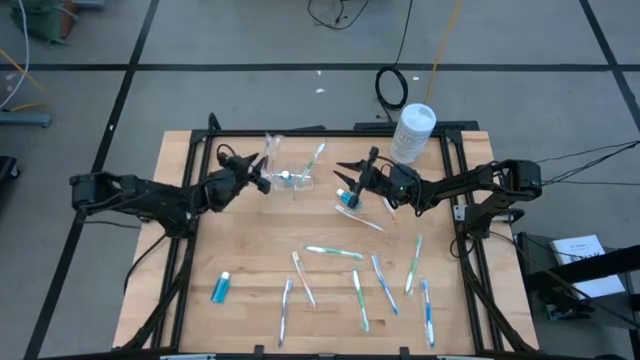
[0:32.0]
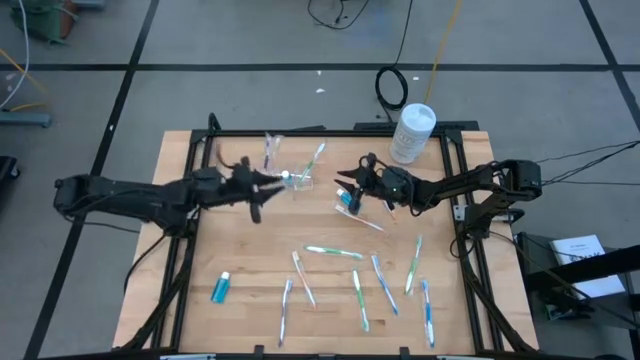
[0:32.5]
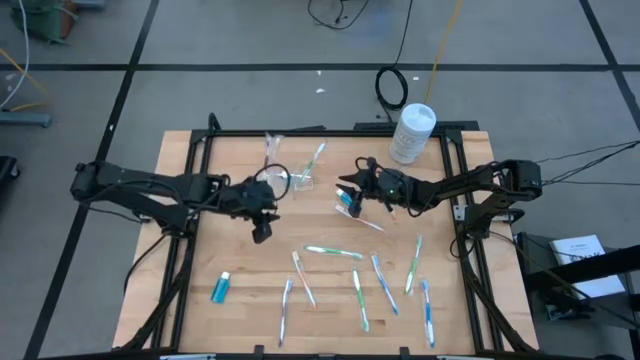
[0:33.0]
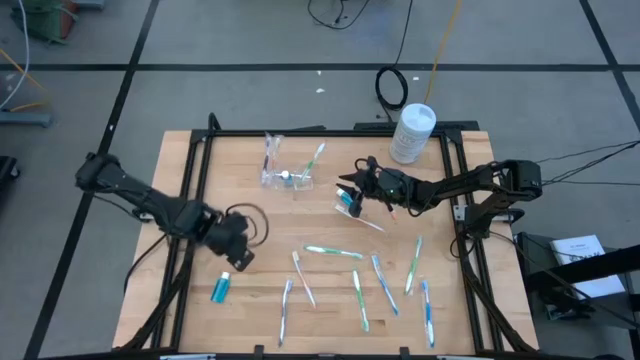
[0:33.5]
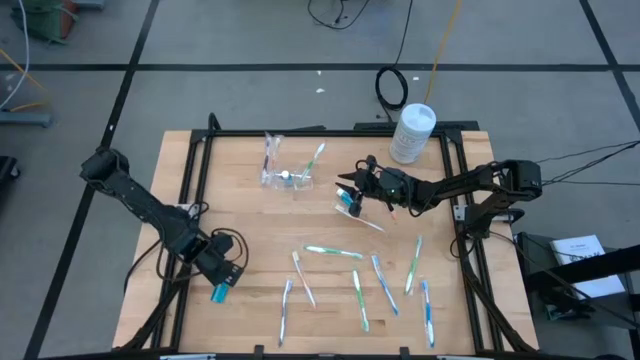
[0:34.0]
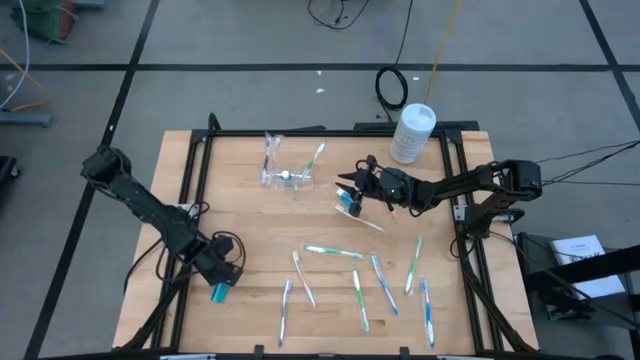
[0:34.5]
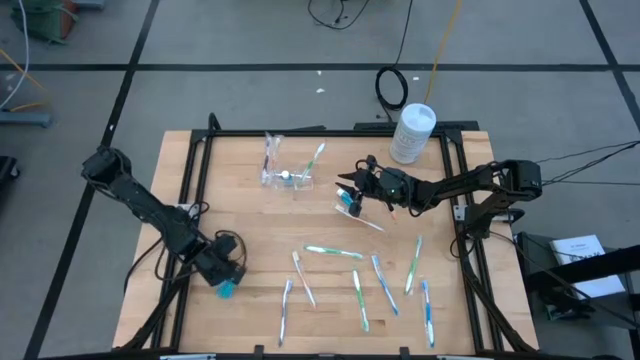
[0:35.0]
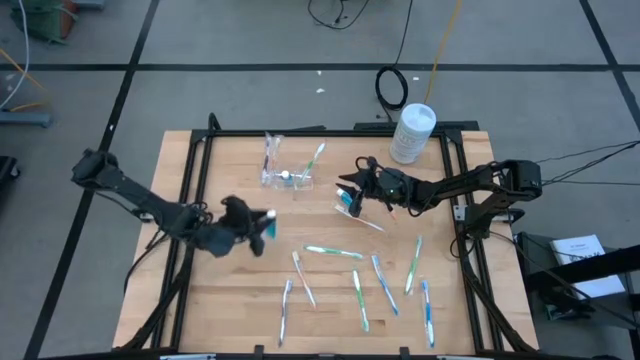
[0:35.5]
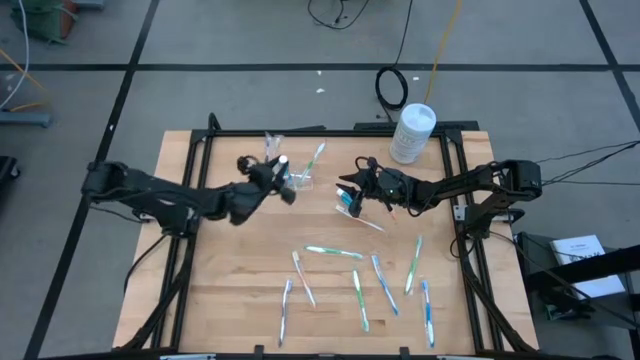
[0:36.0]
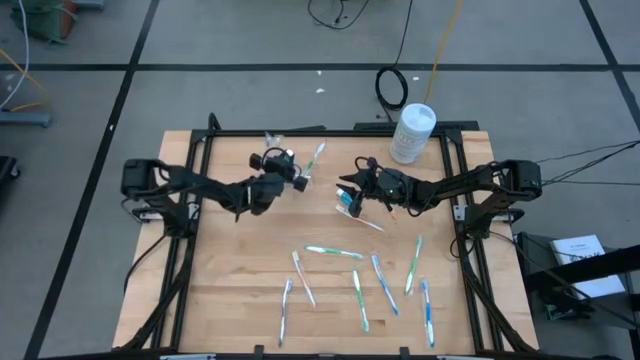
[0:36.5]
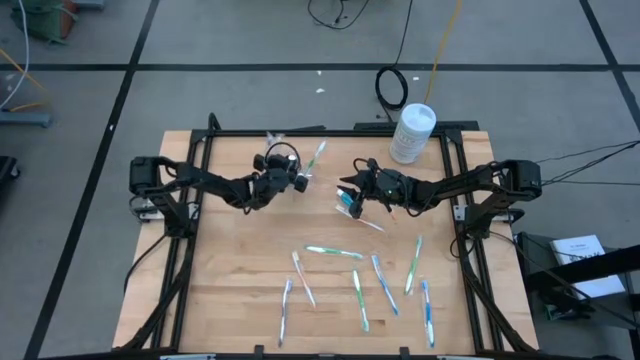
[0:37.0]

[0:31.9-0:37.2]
Task: Pick & Place toothbrushing station
Put the blue mouthwash into the transparent organizer

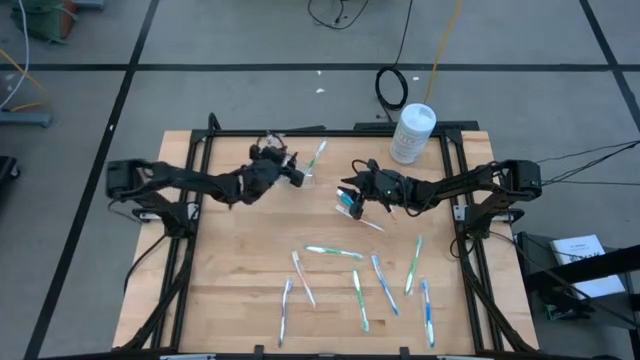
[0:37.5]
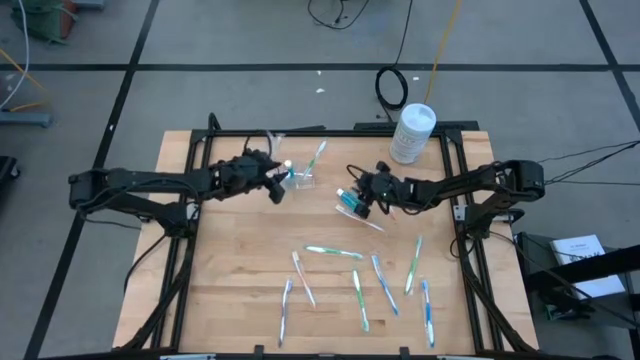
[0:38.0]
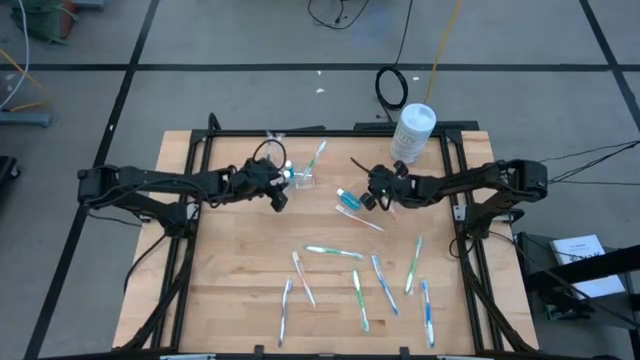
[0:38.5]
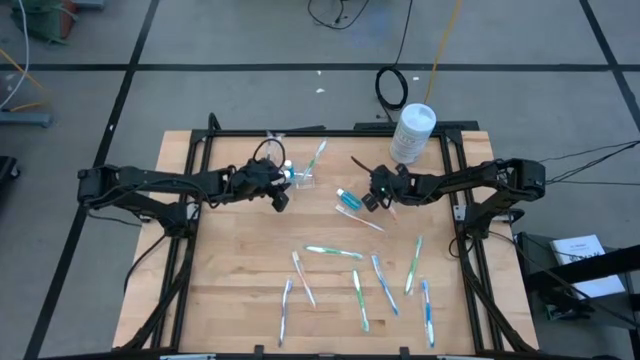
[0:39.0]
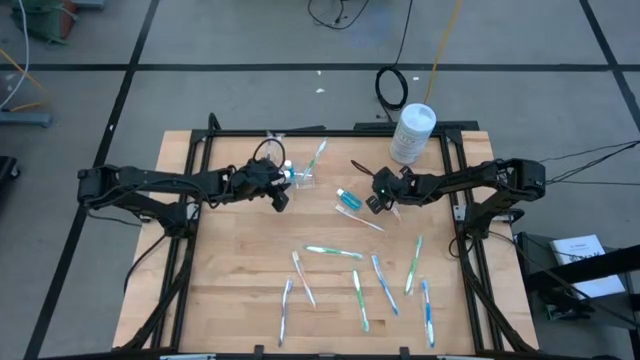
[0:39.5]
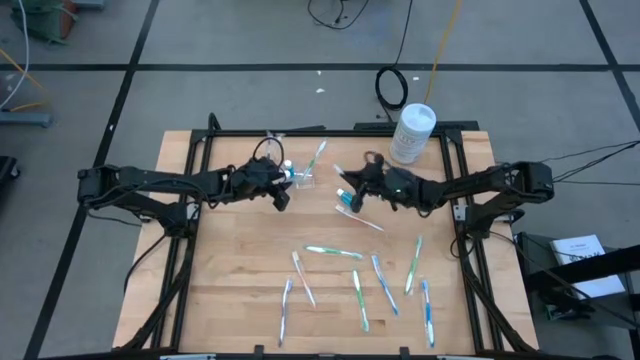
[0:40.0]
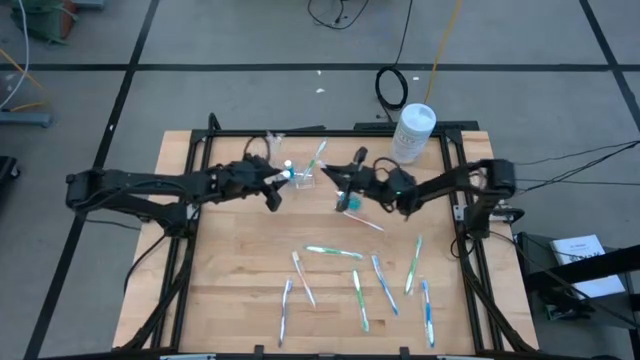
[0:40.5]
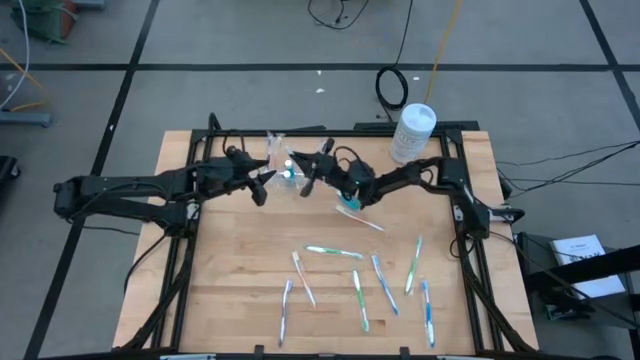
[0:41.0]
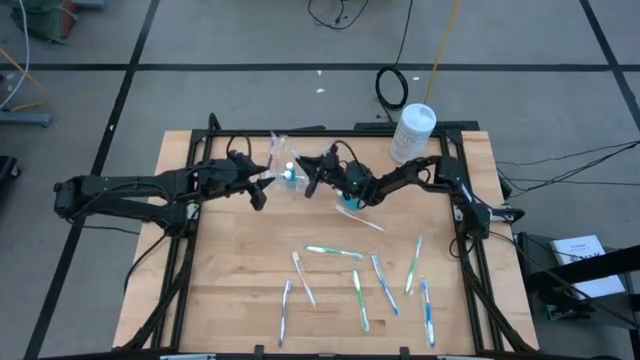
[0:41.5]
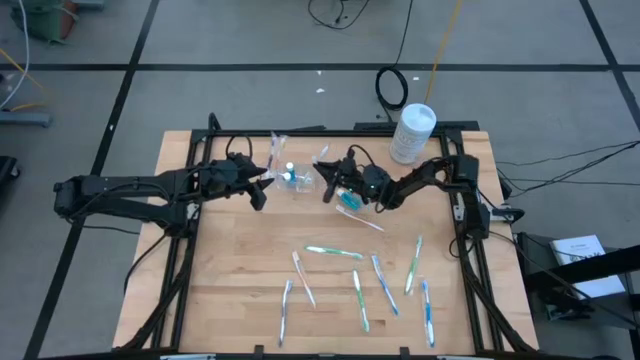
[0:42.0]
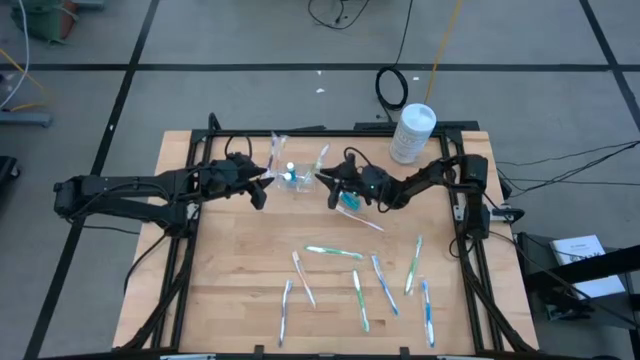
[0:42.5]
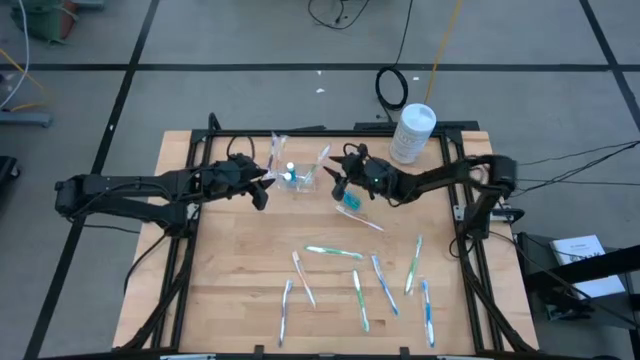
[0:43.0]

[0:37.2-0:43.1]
Put the orange toothbrush into the transparent organizer

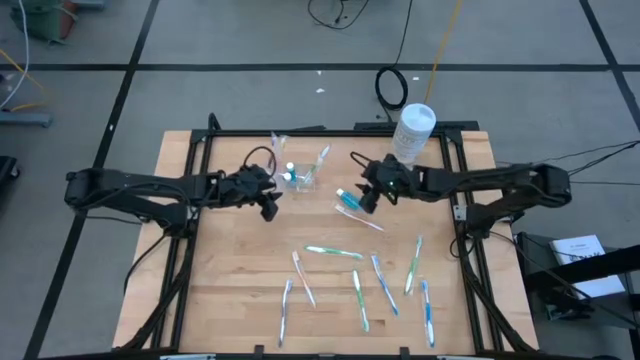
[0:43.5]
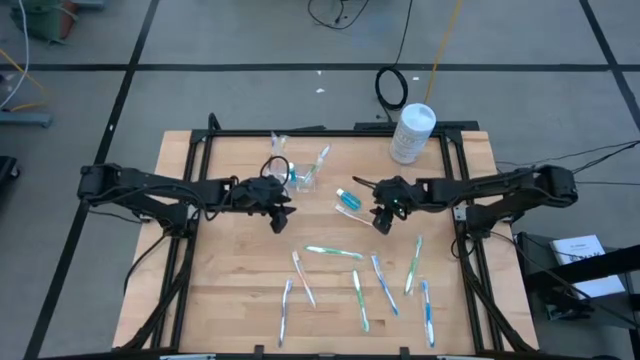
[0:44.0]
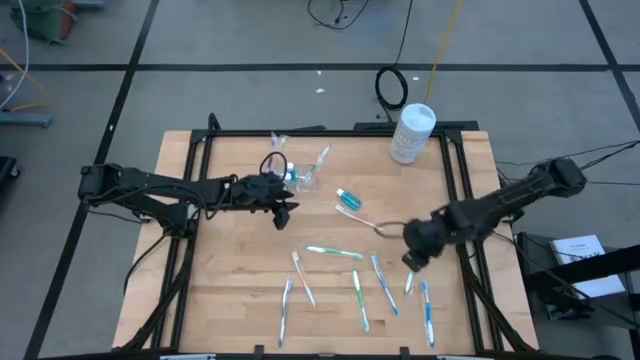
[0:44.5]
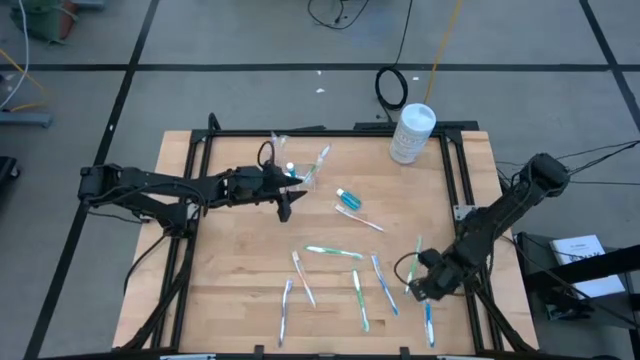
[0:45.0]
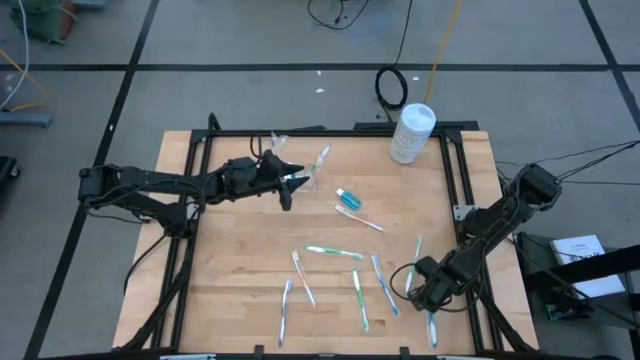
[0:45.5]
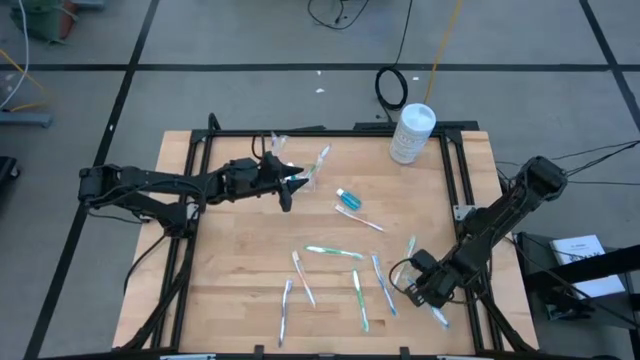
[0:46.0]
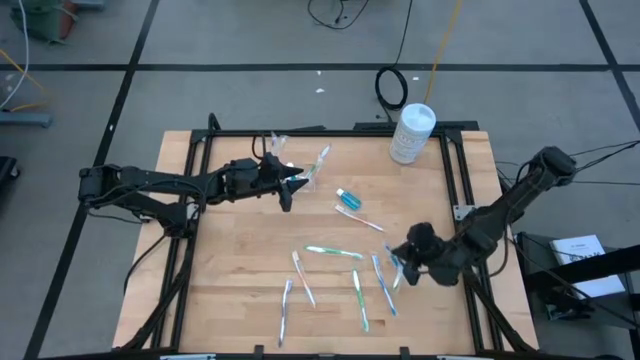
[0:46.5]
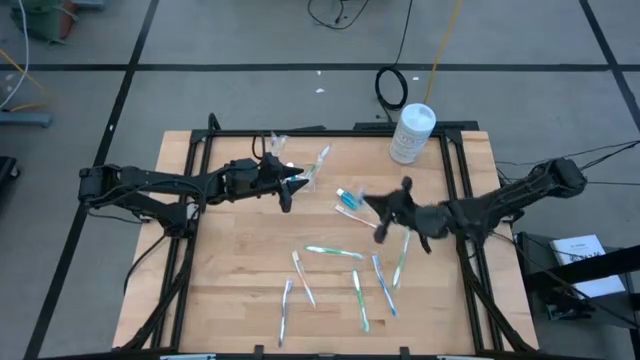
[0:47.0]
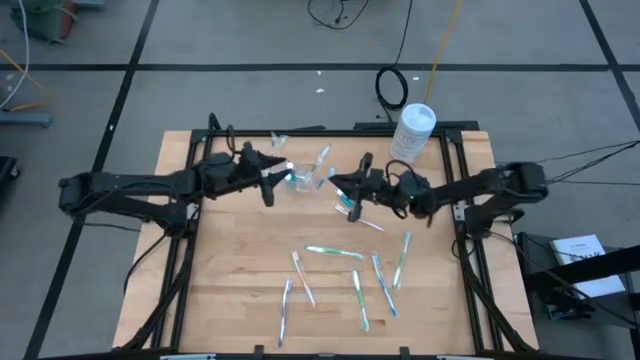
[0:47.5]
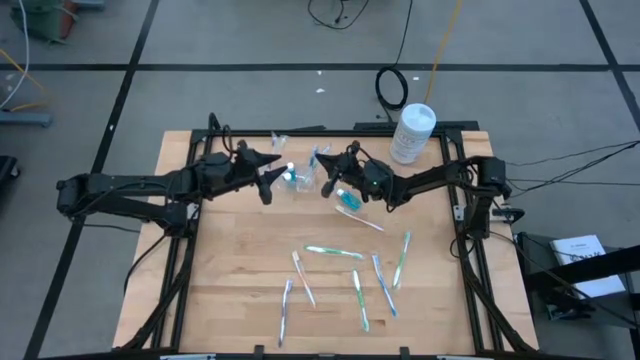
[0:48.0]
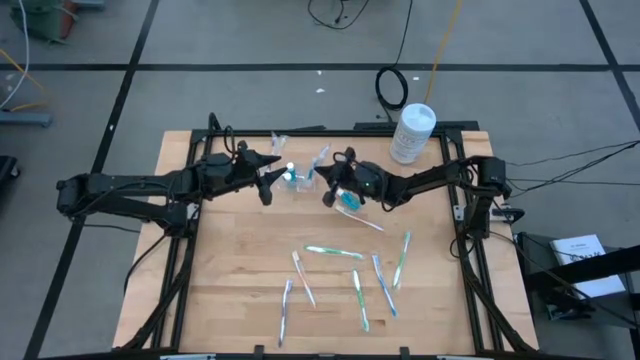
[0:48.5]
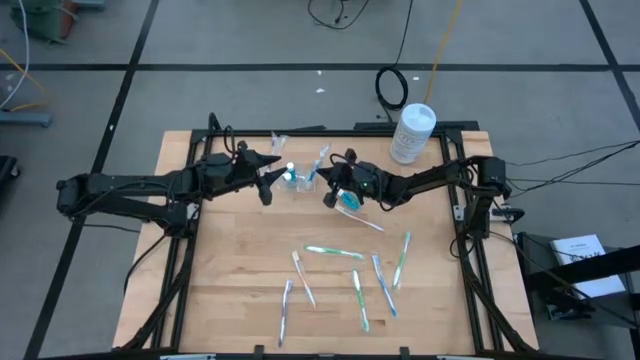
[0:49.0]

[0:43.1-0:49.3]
Put the blue toothbrush into the transparent organizer

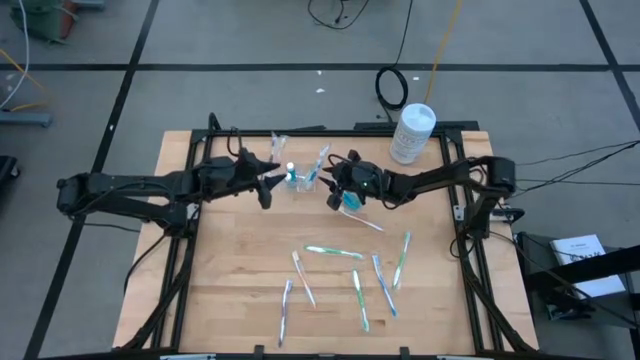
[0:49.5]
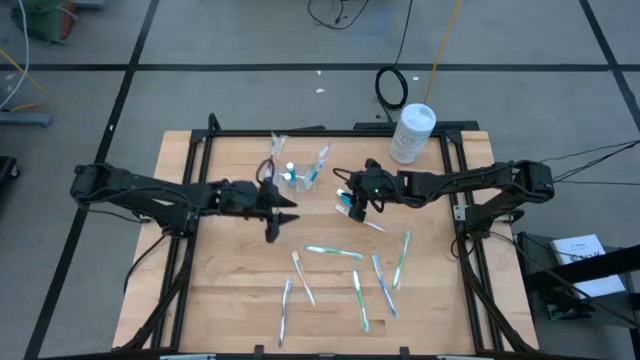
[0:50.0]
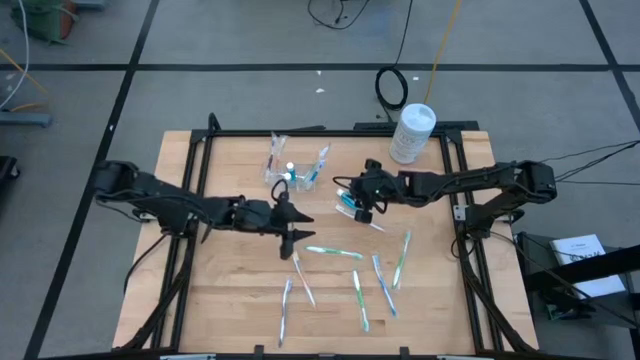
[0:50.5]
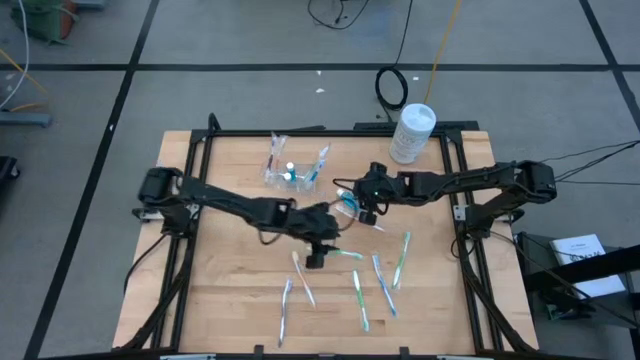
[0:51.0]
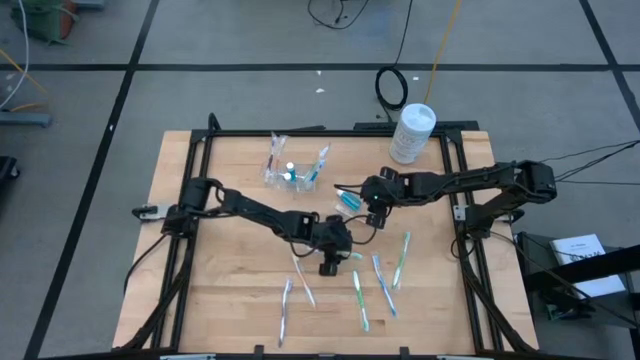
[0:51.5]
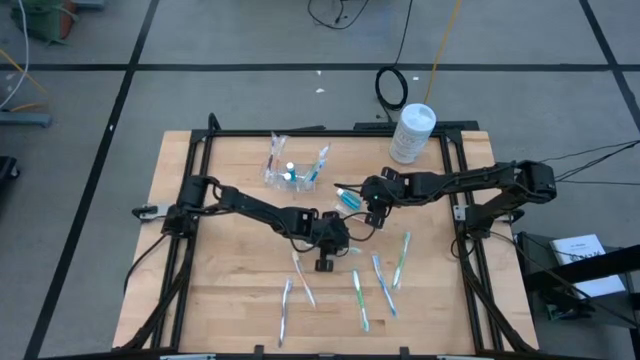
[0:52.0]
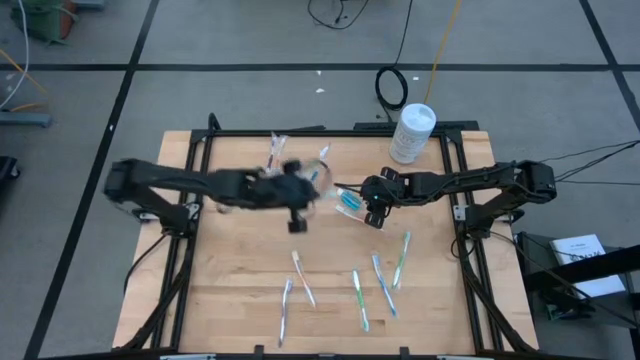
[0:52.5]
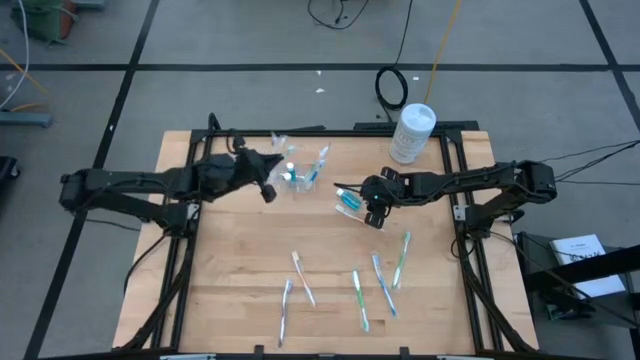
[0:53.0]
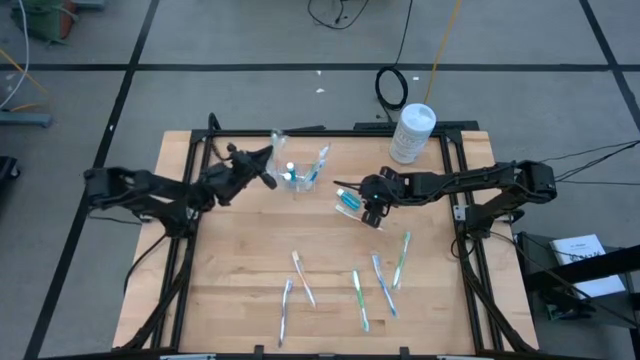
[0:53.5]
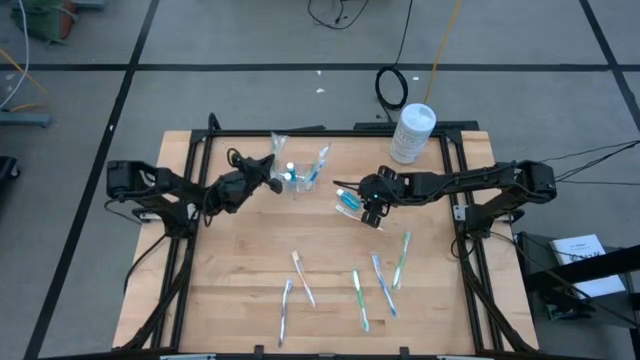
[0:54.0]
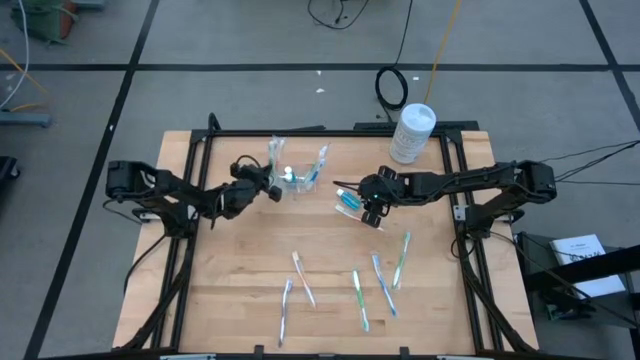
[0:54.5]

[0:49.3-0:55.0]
Put the green toothbrush into the transparent organizer
